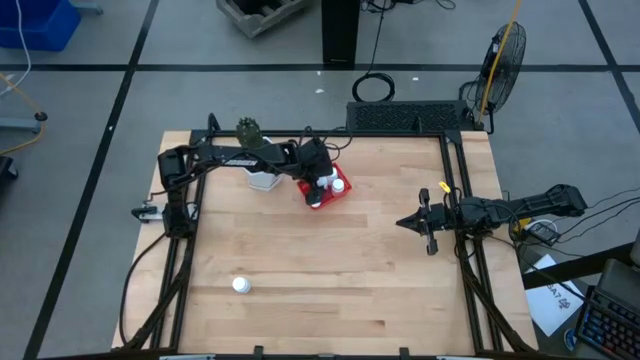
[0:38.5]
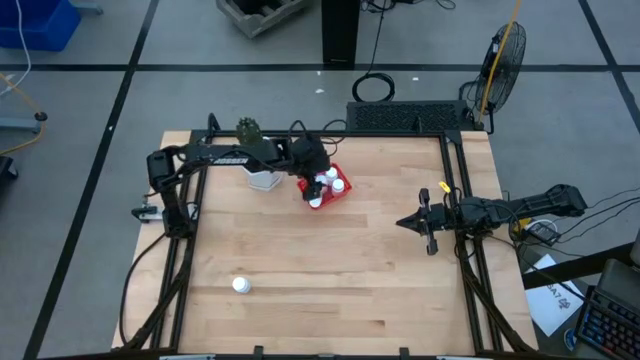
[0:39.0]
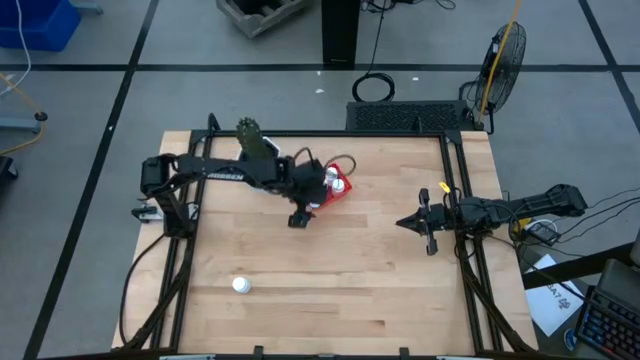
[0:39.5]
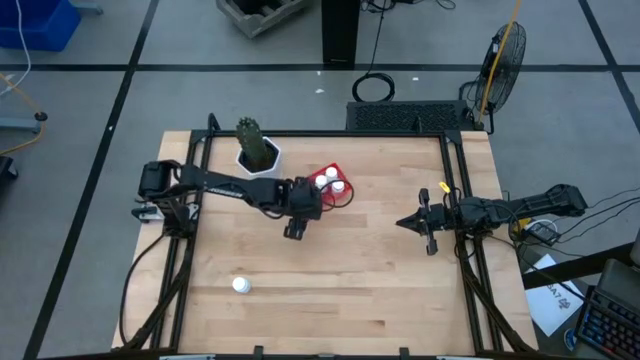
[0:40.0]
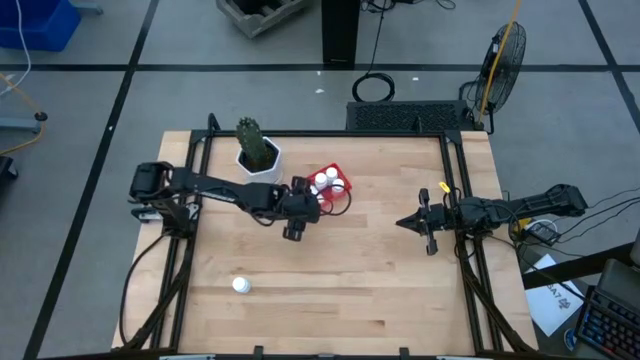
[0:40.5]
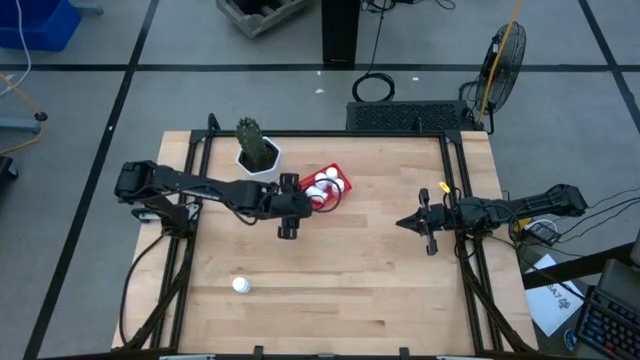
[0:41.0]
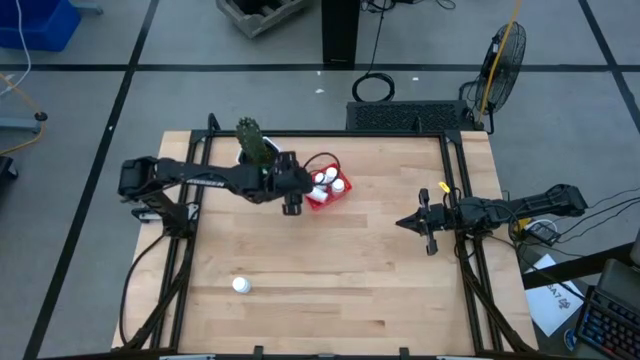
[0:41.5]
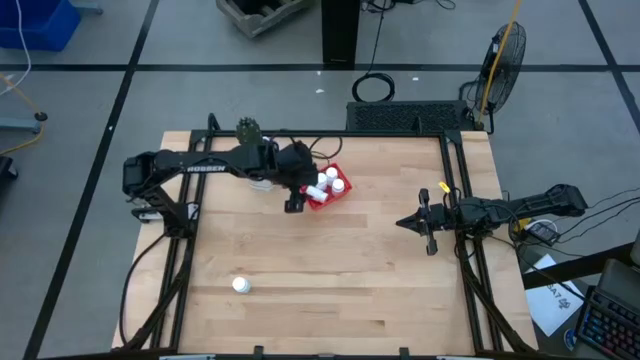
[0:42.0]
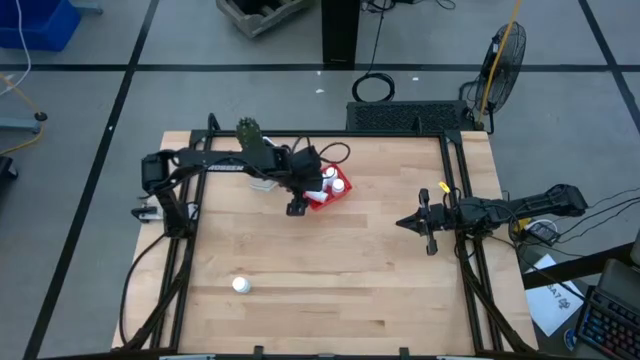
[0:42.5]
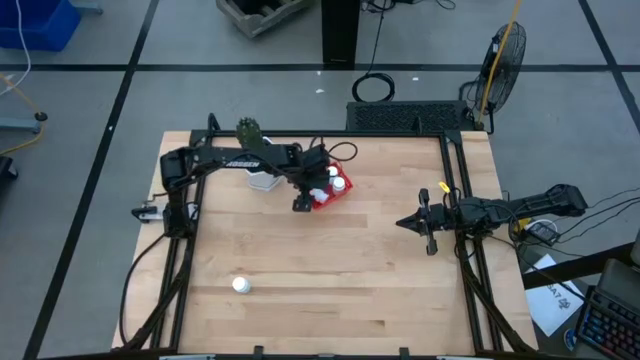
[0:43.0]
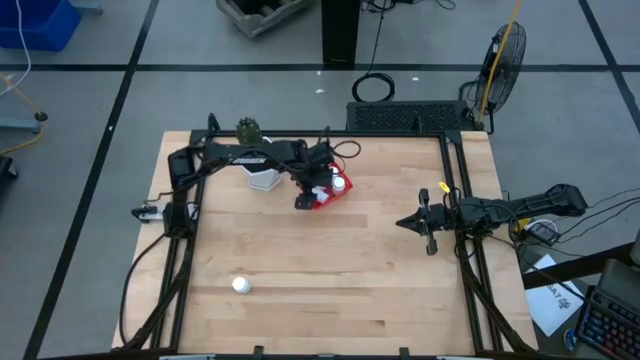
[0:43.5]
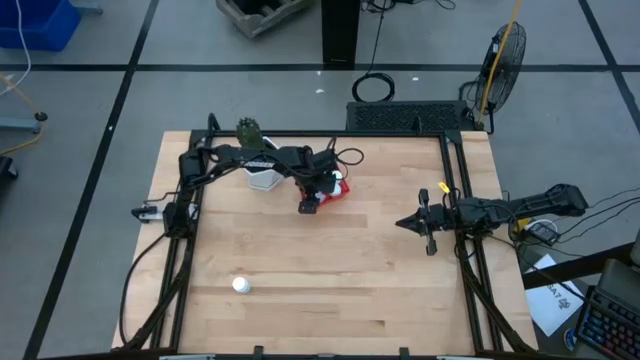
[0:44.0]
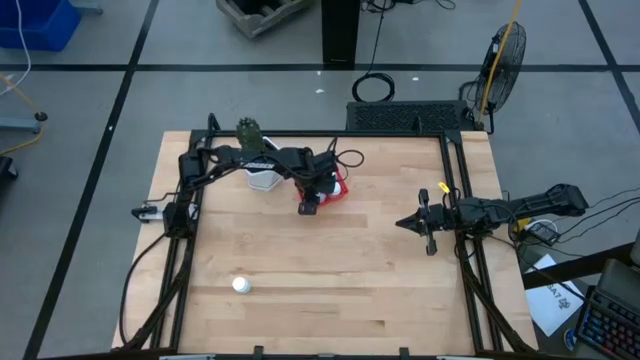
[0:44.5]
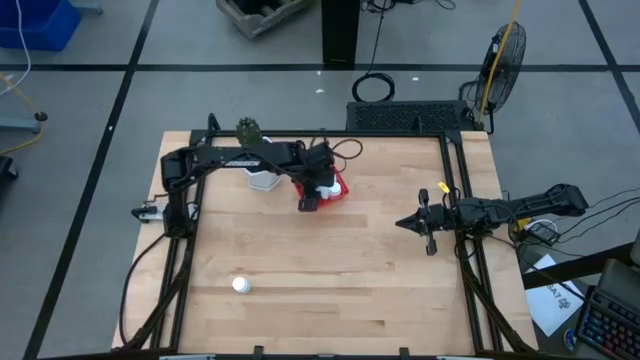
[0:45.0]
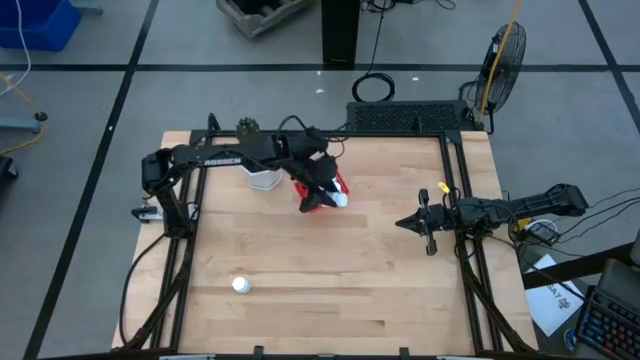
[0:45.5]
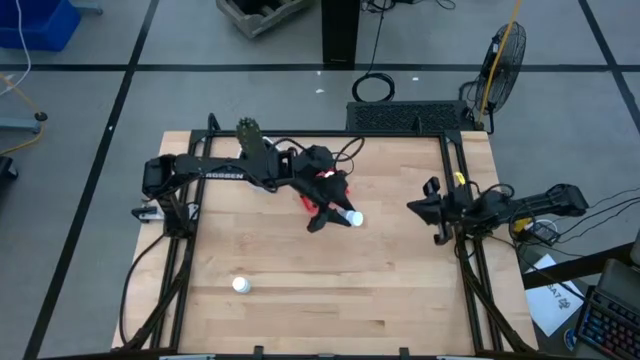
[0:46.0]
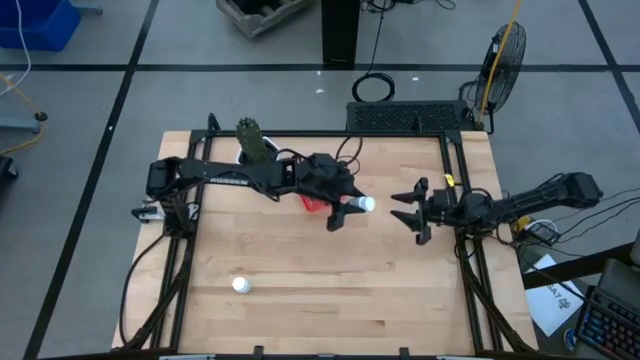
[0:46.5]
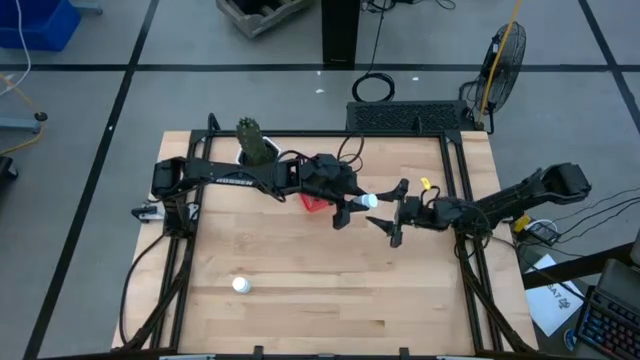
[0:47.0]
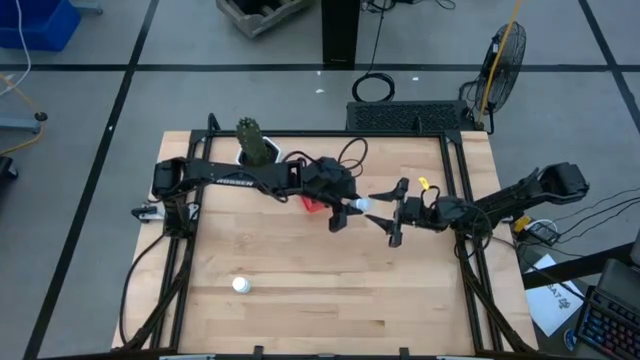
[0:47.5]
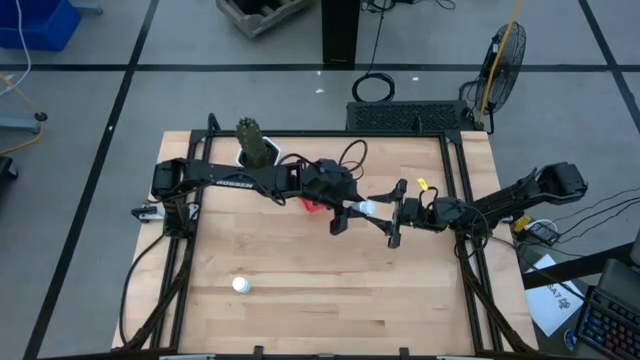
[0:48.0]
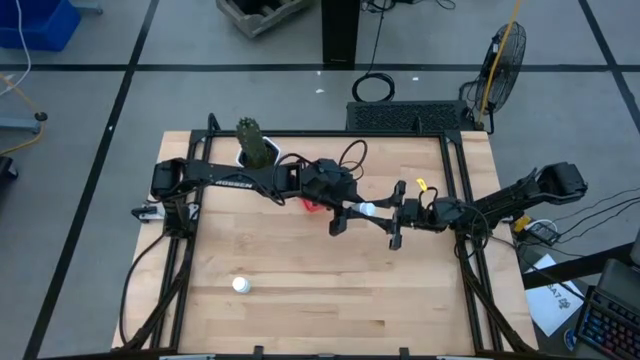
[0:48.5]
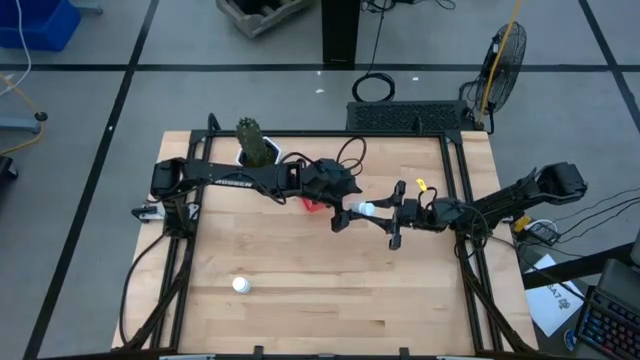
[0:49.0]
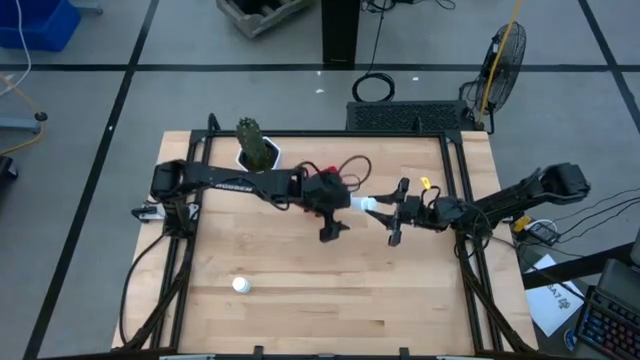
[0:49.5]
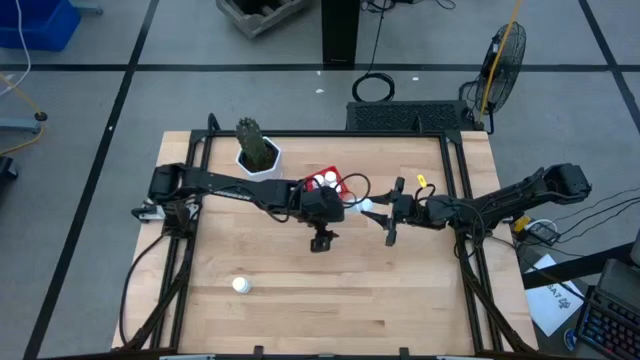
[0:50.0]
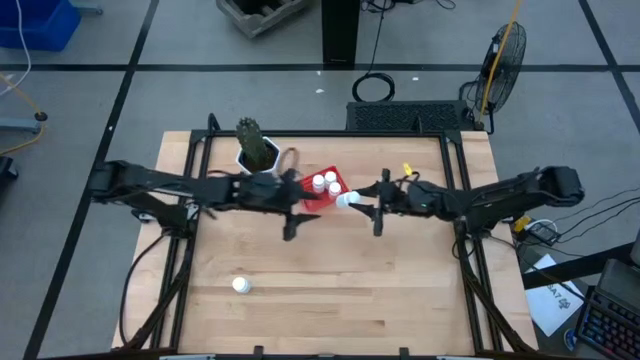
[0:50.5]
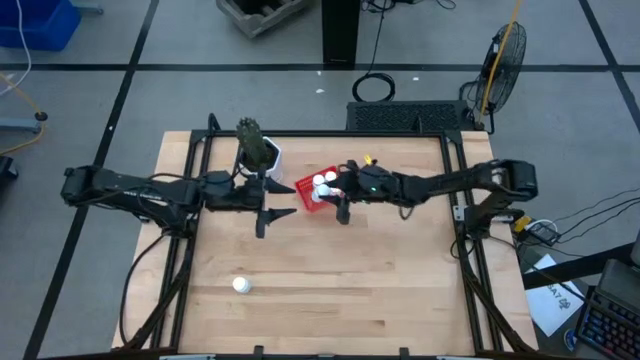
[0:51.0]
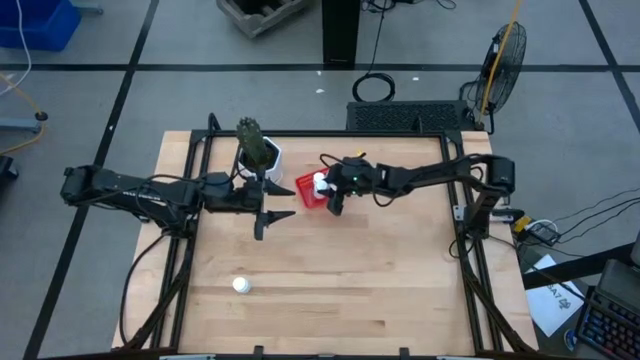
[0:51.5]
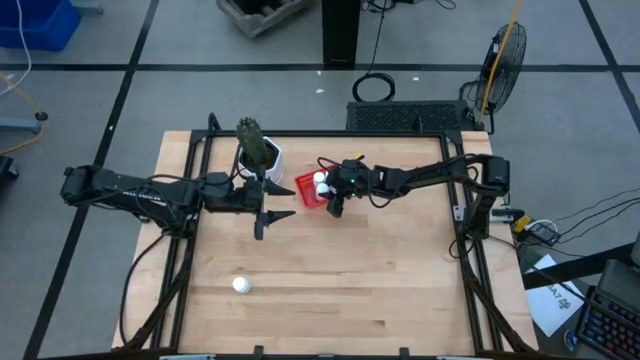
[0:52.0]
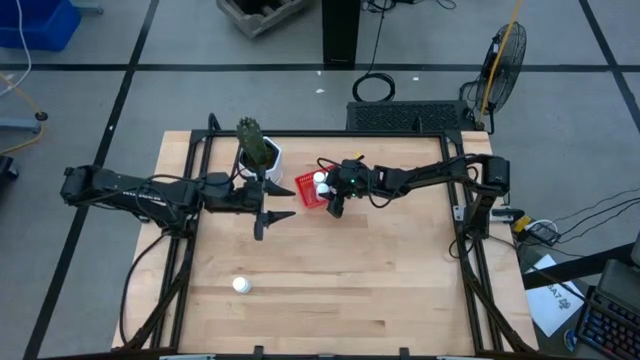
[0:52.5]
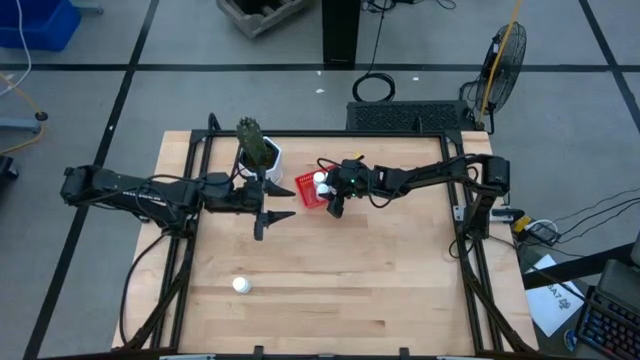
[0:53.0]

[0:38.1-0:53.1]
Task: Pick and place pill bottles into a basket
Adjust the white pill bottle in the red bin

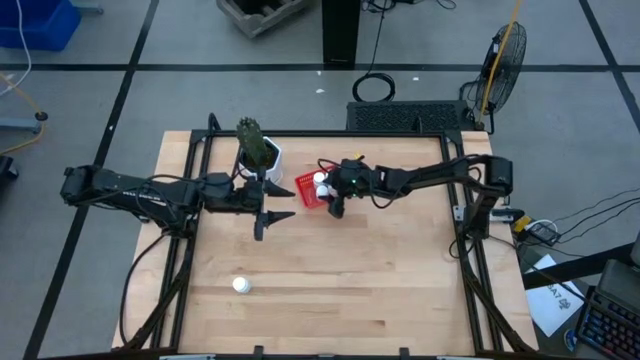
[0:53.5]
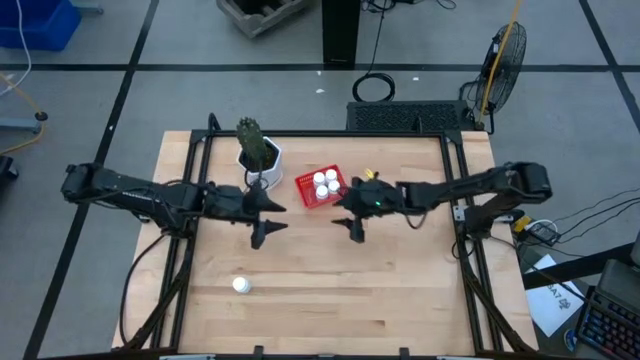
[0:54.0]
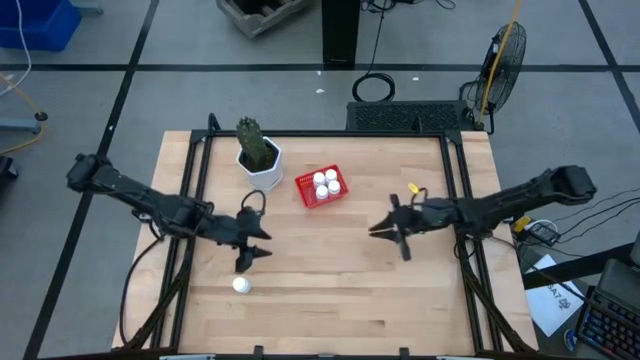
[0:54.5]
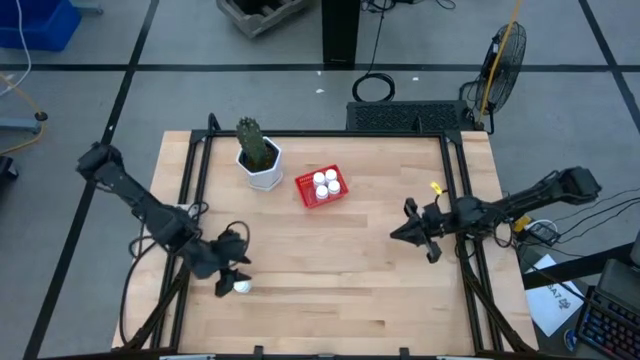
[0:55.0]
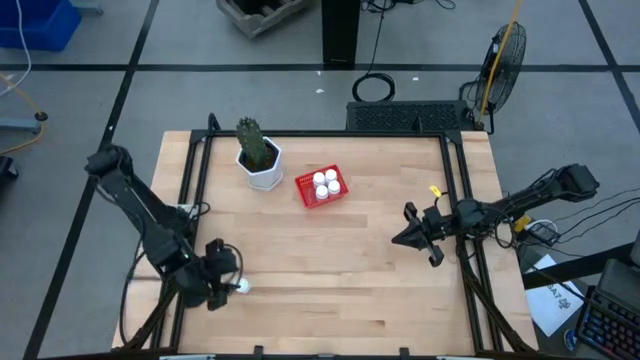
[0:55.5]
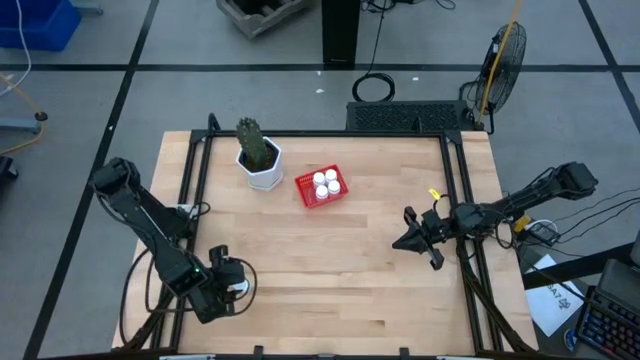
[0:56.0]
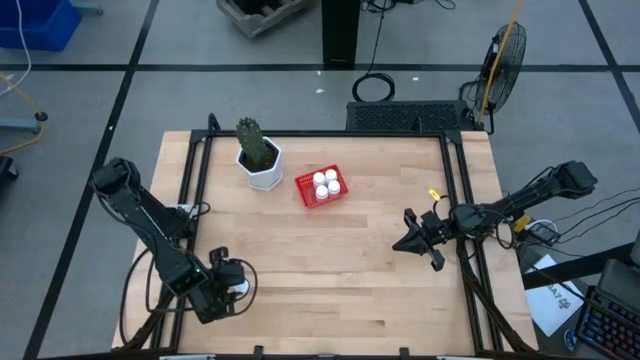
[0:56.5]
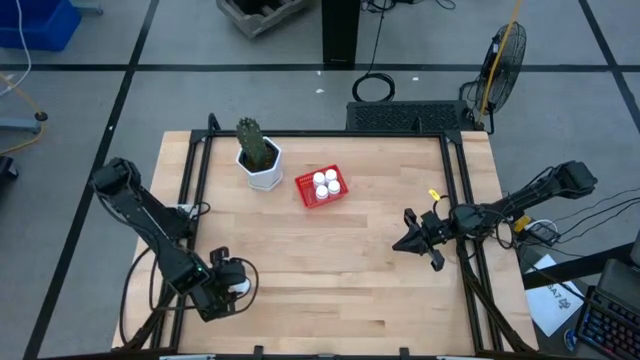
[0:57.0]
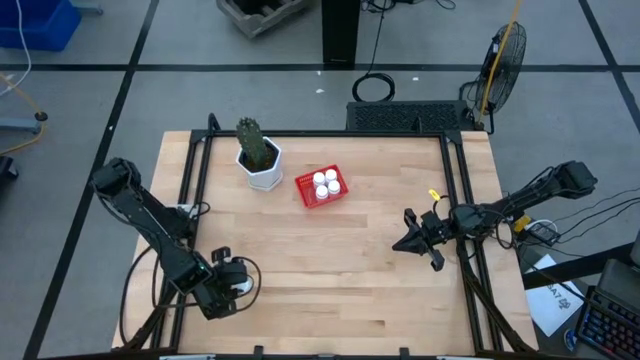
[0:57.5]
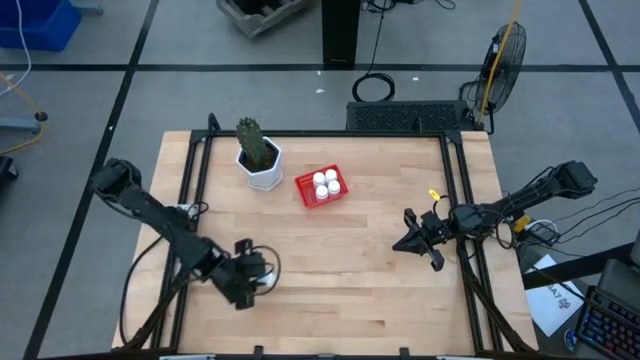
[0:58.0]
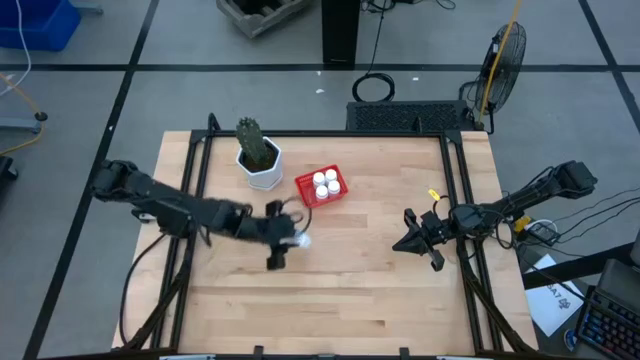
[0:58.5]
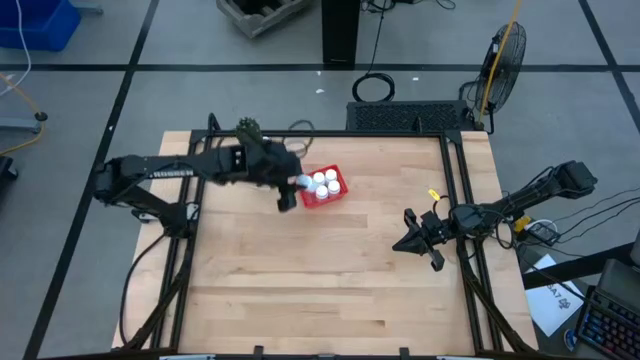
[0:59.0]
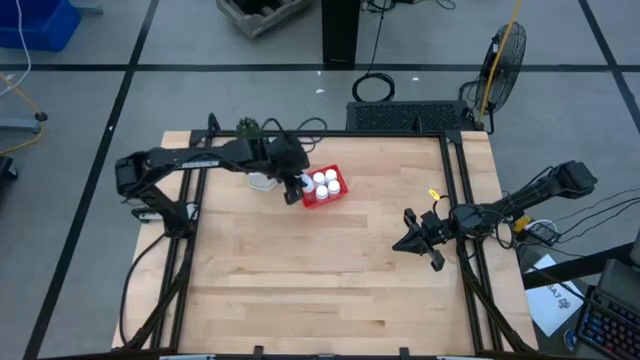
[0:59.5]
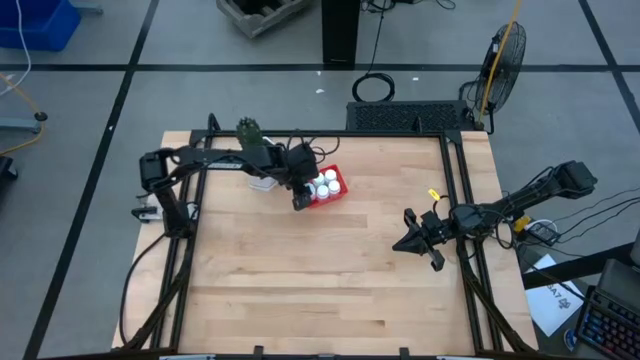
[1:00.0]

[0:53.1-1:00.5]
Put the white pill bottle into the red bin
